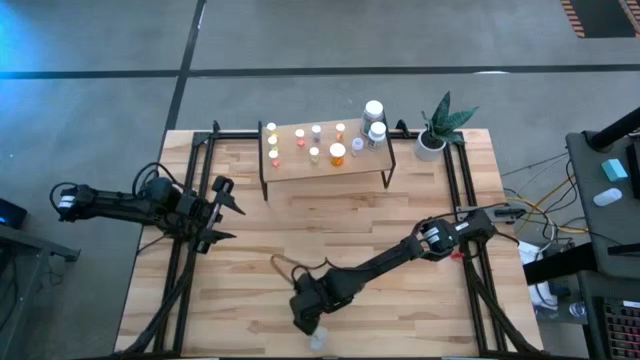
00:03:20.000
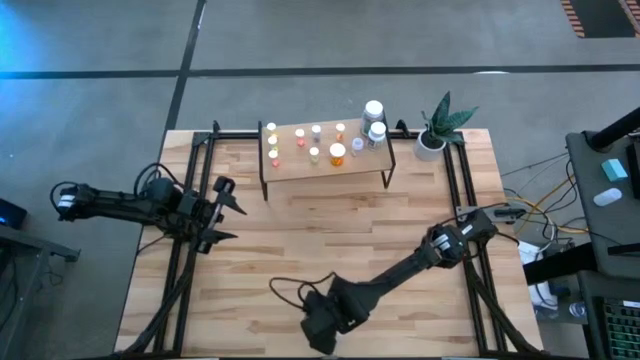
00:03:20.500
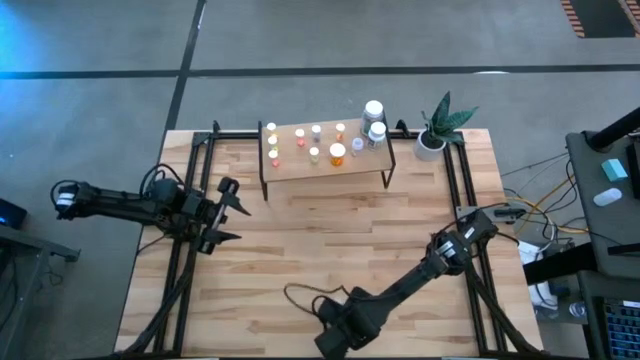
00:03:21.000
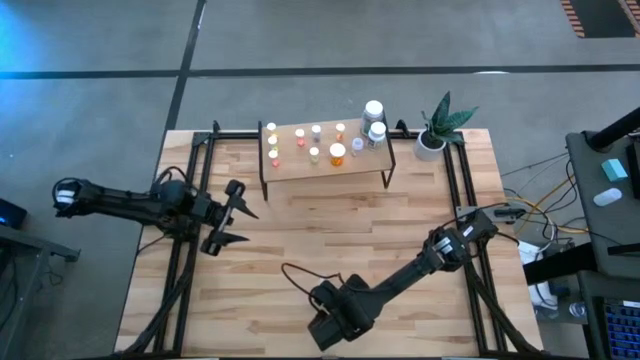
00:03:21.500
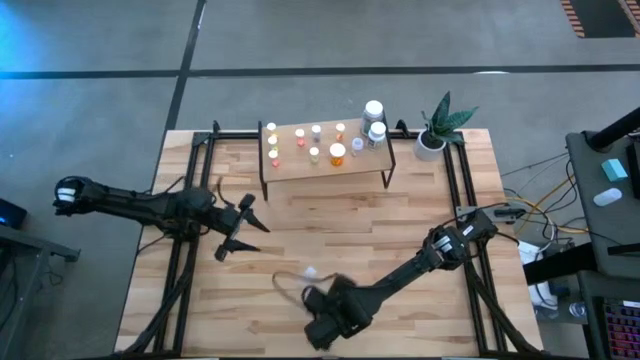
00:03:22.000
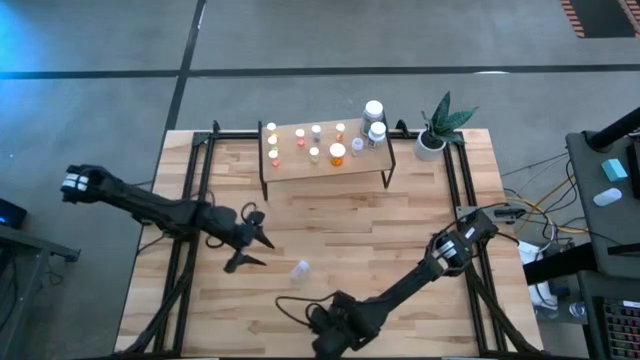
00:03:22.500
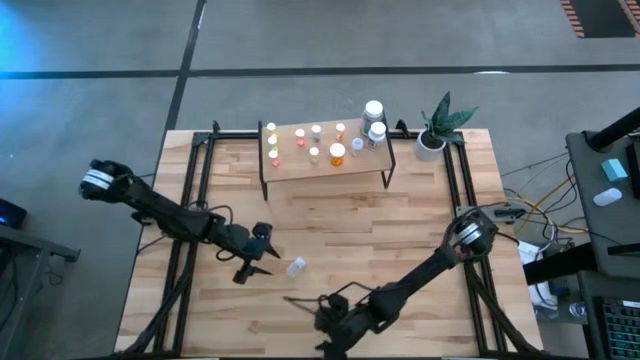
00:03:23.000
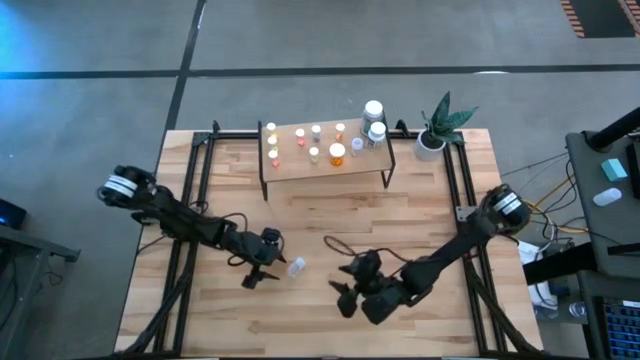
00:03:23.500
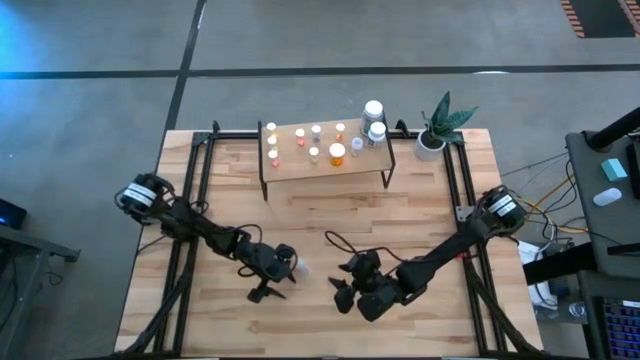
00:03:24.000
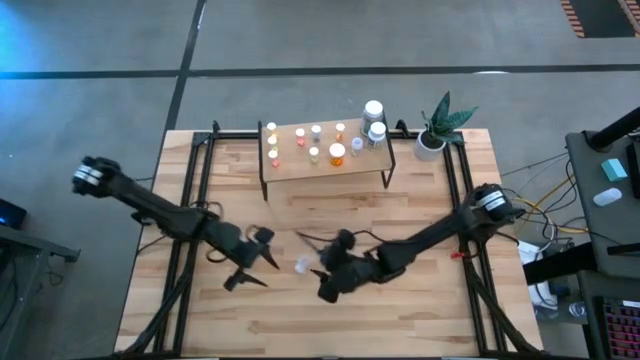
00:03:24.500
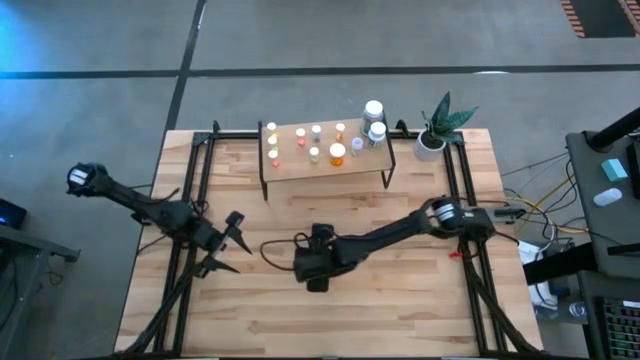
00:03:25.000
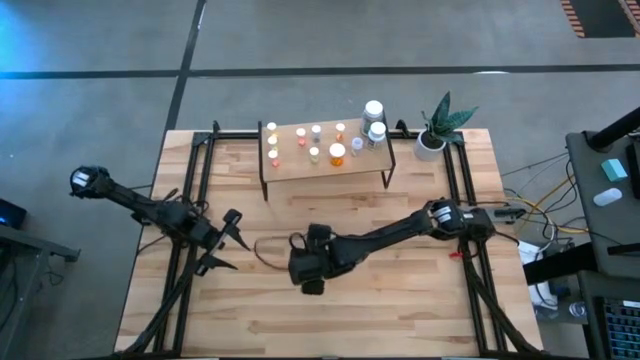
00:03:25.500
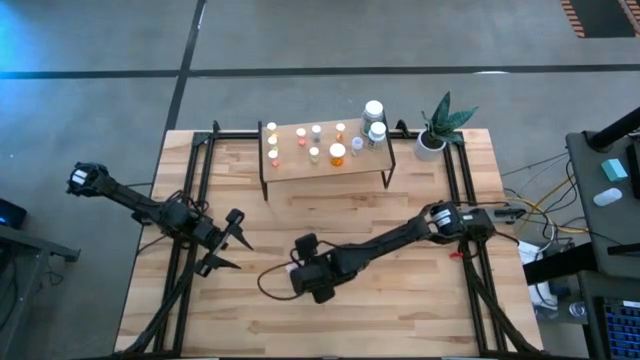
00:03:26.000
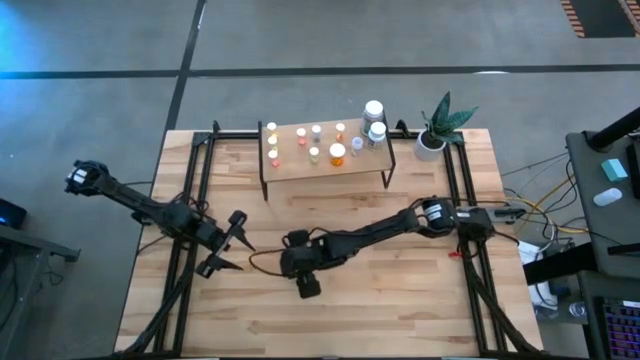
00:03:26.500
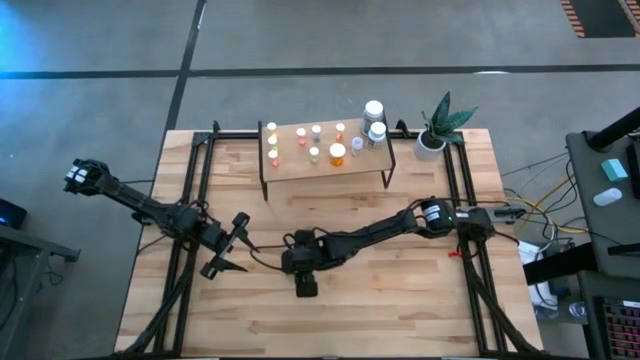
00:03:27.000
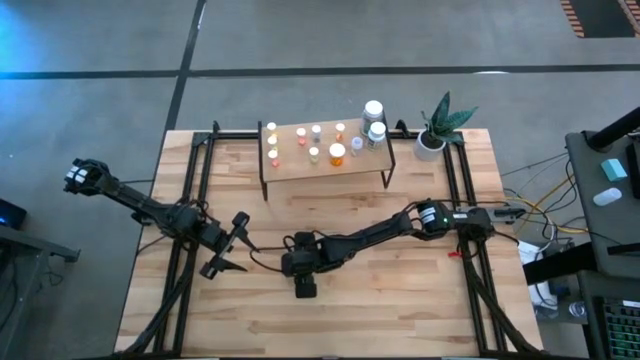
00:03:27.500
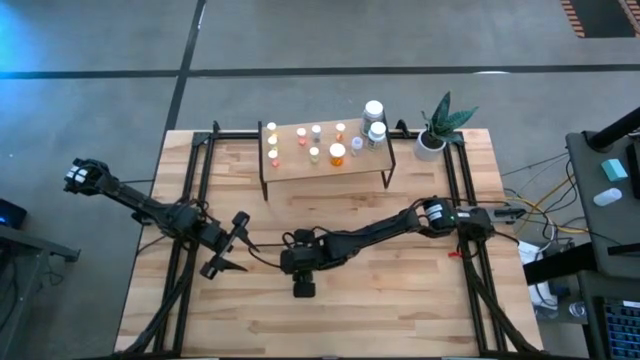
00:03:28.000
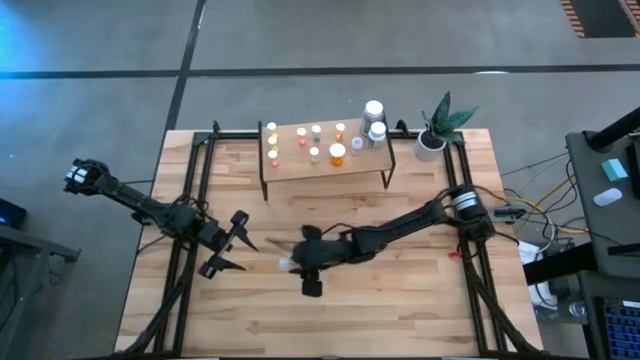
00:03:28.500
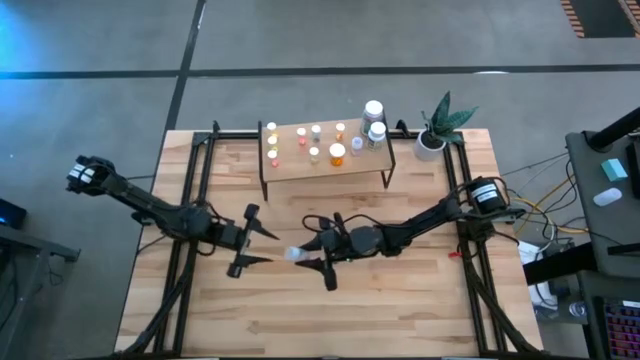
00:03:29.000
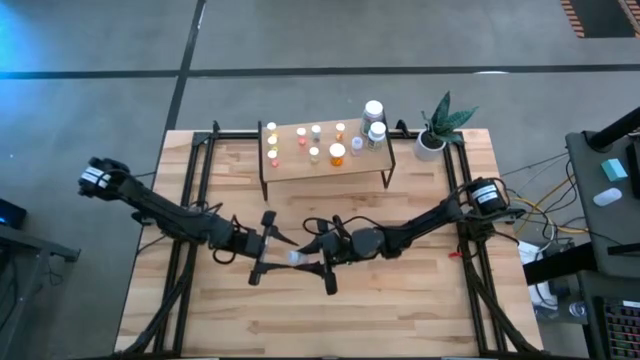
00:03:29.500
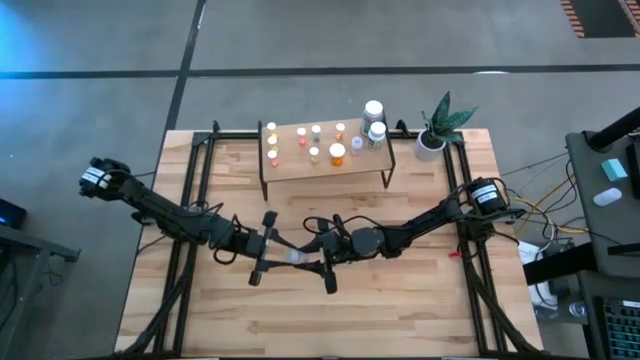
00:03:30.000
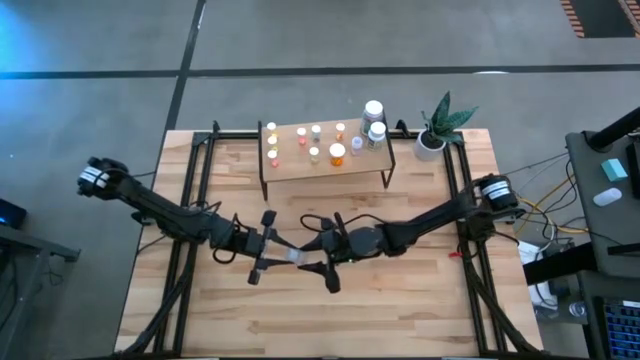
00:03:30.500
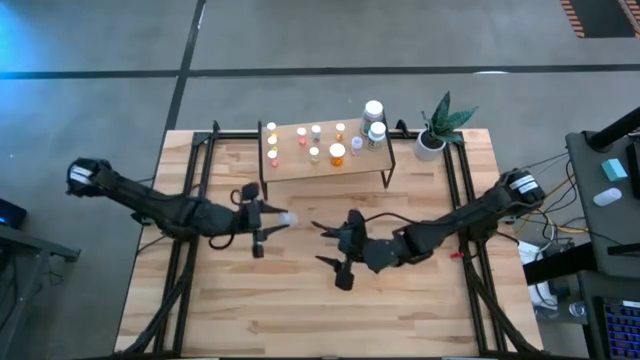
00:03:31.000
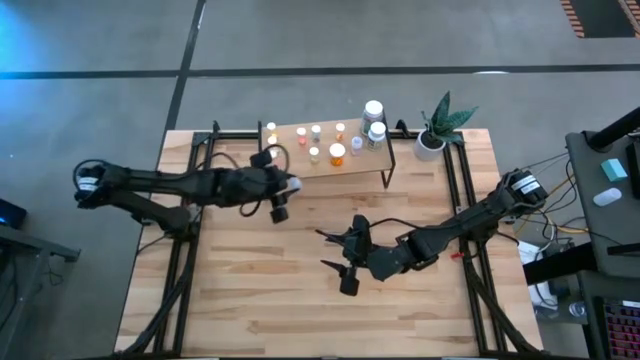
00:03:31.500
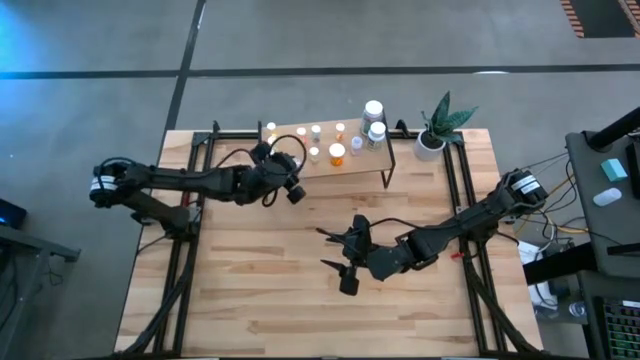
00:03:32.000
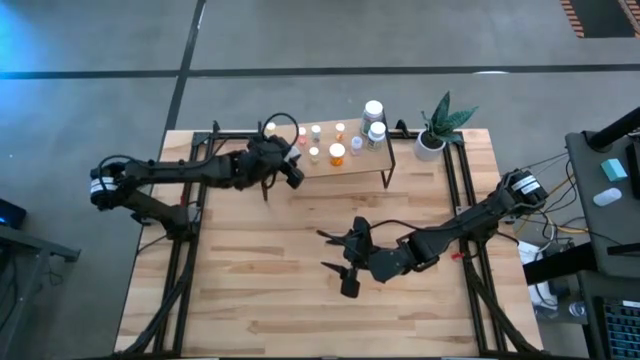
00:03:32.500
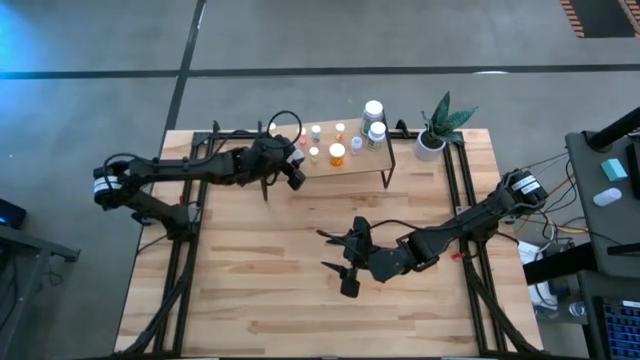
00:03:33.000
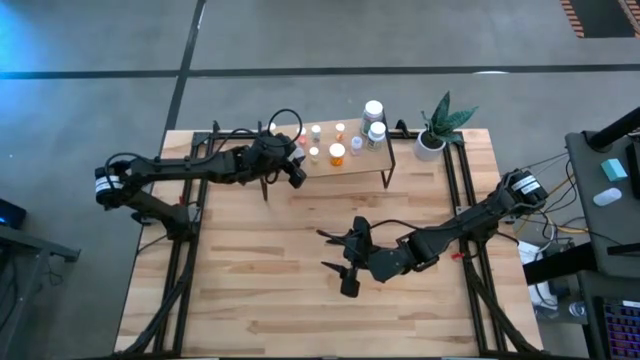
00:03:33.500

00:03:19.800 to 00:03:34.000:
Task: Pick and place medicine bottles onto shelf by color
Put the transparent pill bottle on the shelf

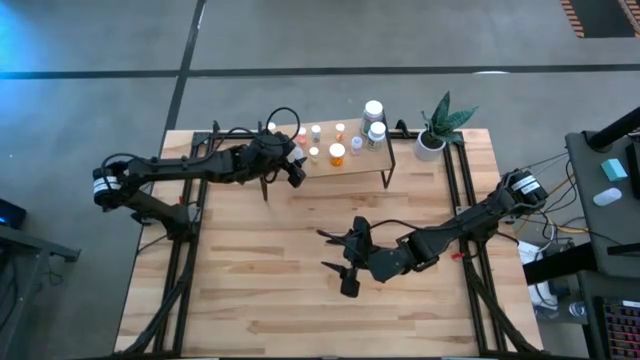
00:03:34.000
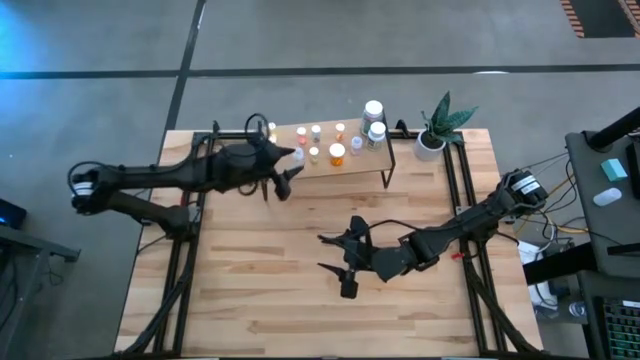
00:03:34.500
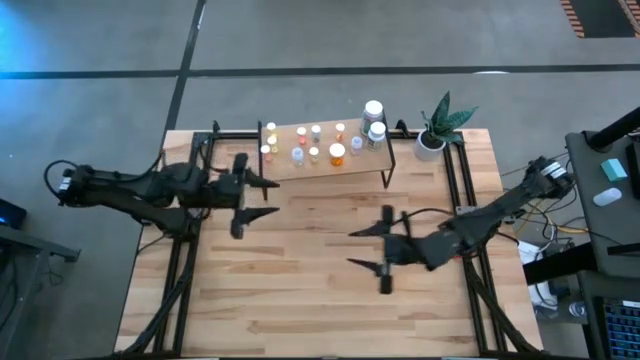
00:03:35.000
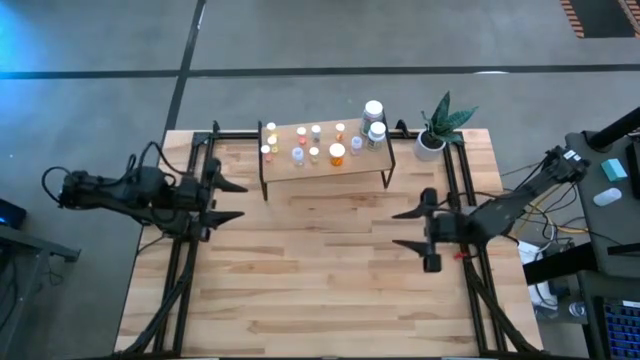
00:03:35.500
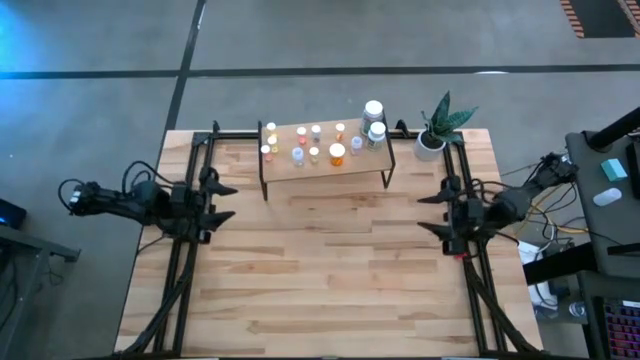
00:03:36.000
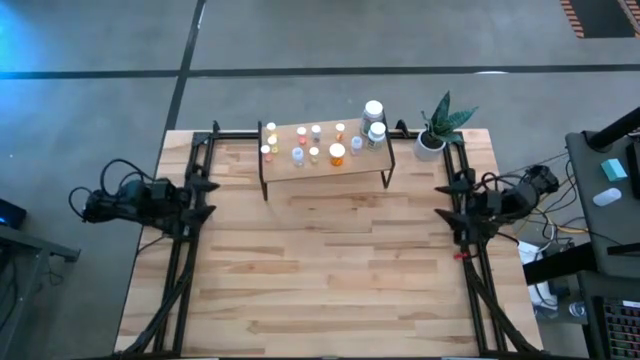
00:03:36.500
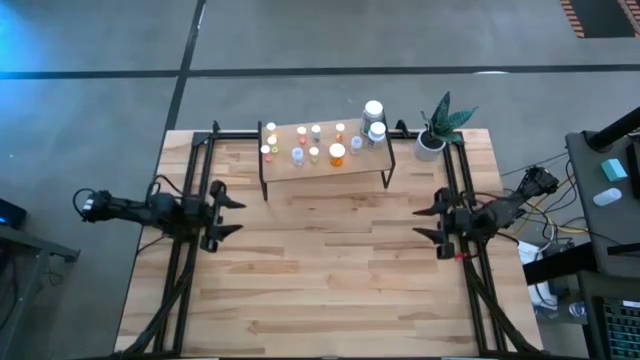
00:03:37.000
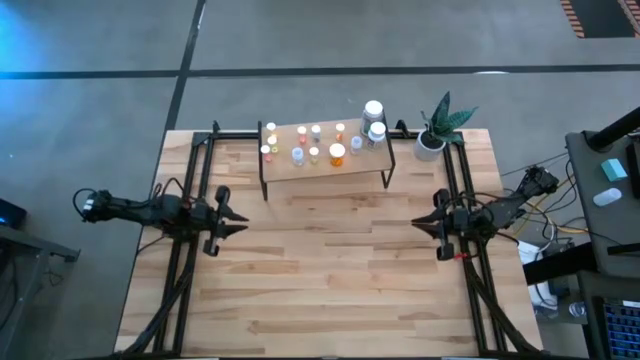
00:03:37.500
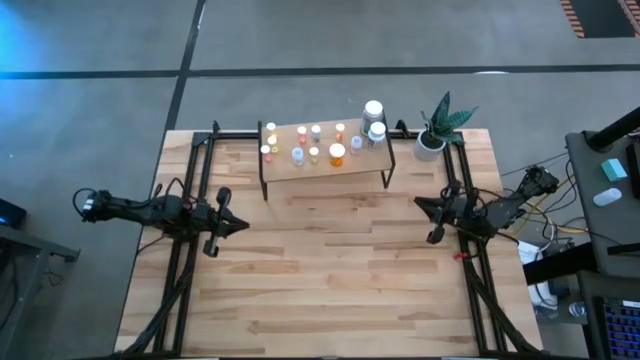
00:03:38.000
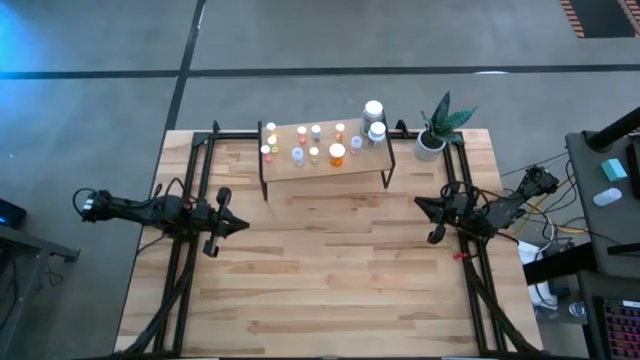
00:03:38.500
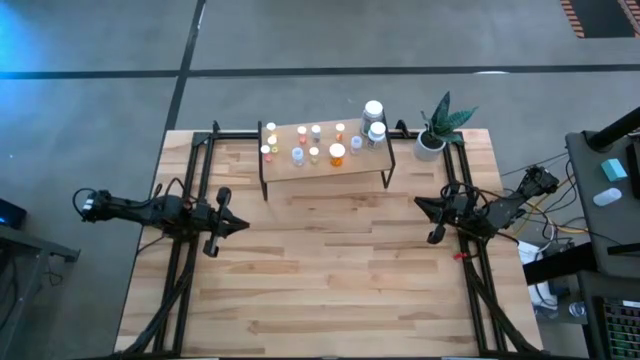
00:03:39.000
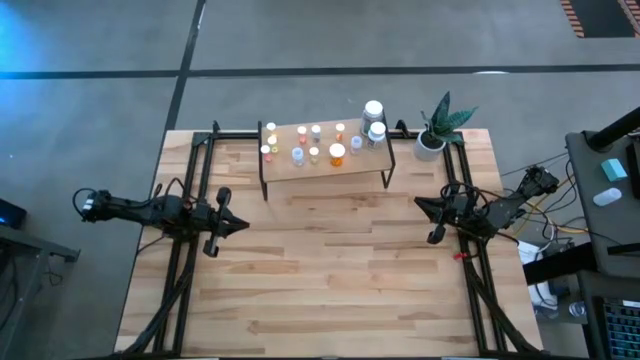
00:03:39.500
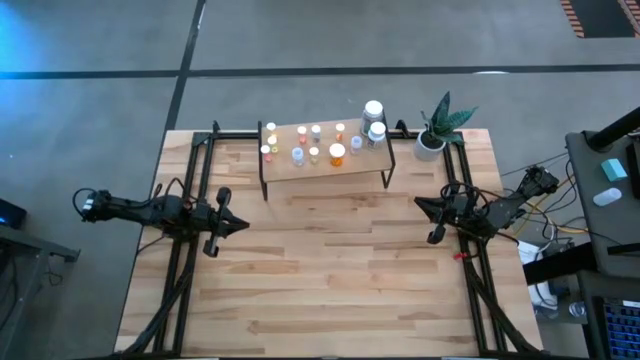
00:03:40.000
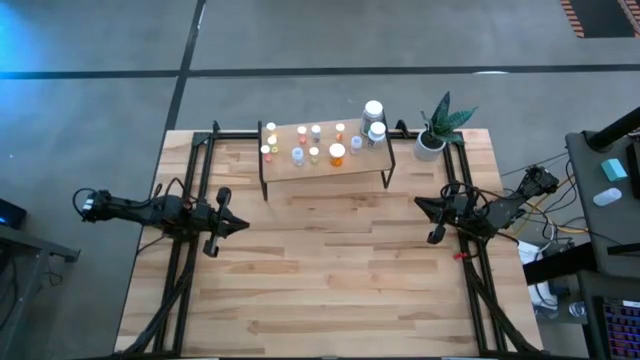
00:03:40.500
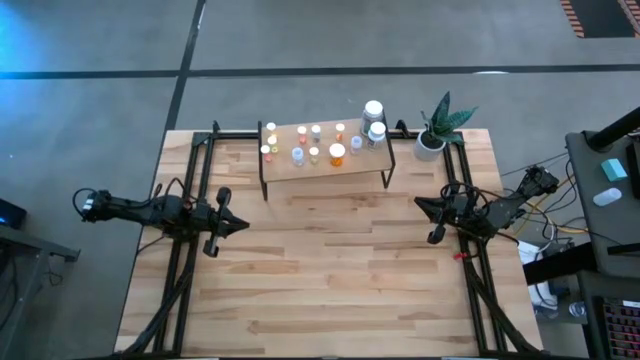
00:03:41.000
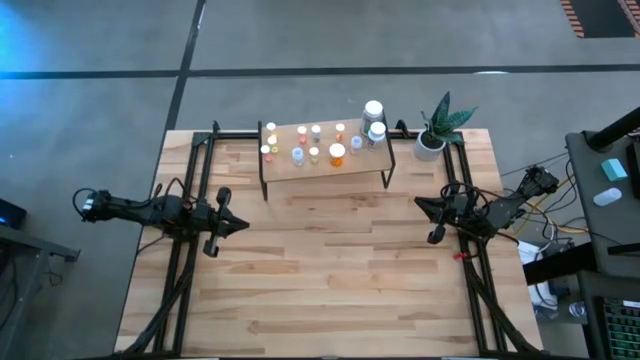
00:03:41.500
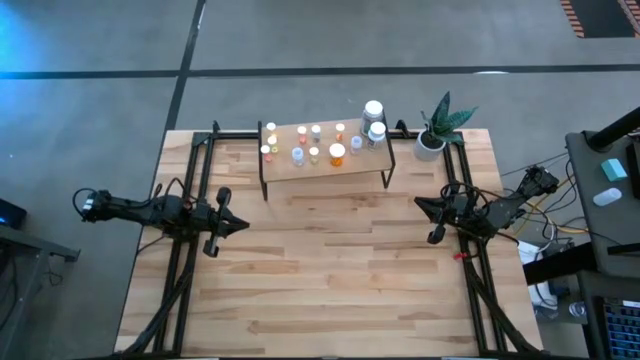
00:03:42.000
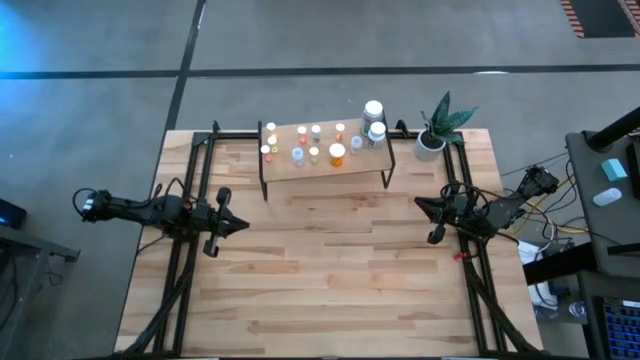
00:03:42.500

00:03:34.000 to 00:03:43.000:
Return to Home Position
